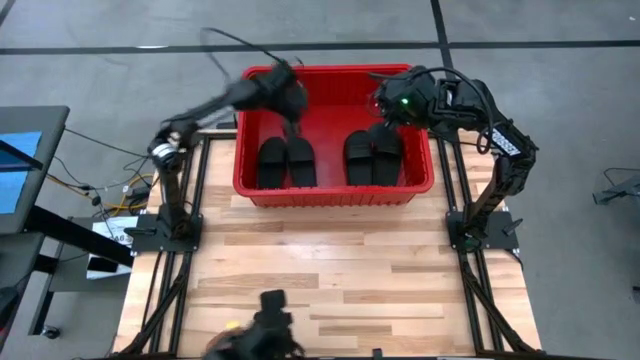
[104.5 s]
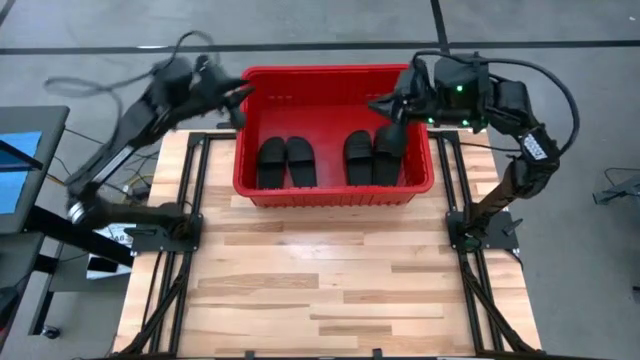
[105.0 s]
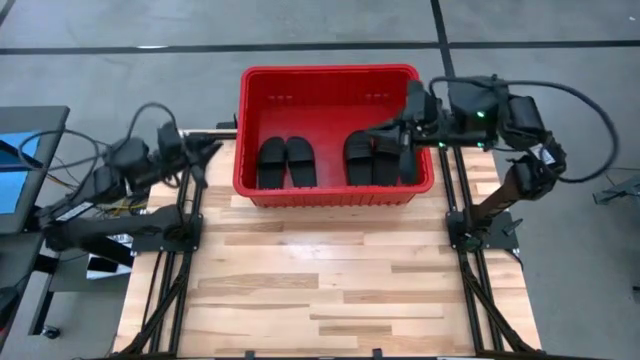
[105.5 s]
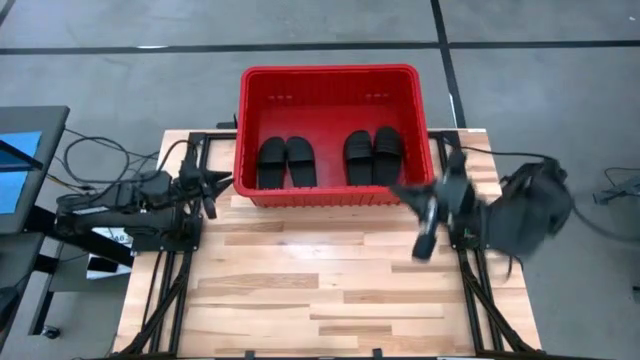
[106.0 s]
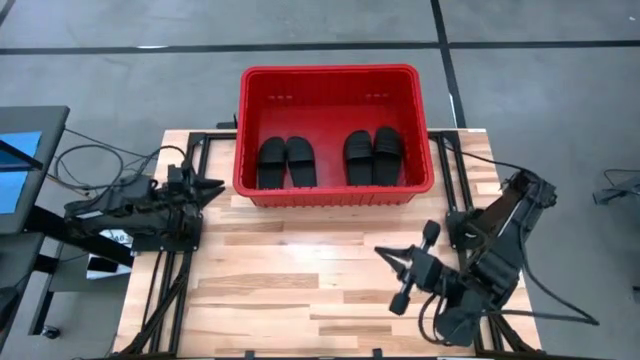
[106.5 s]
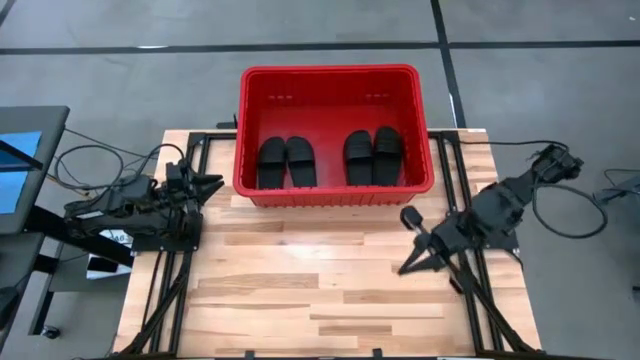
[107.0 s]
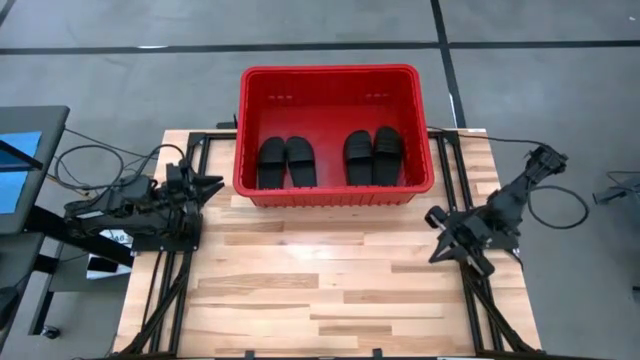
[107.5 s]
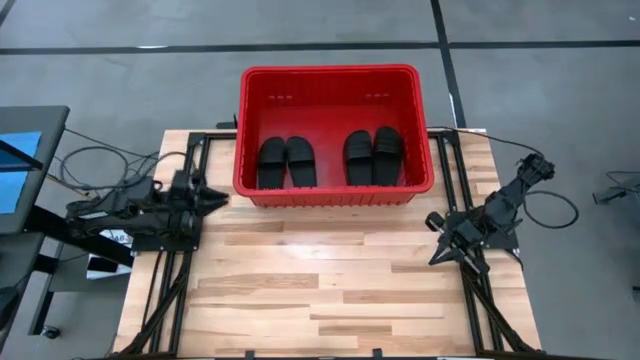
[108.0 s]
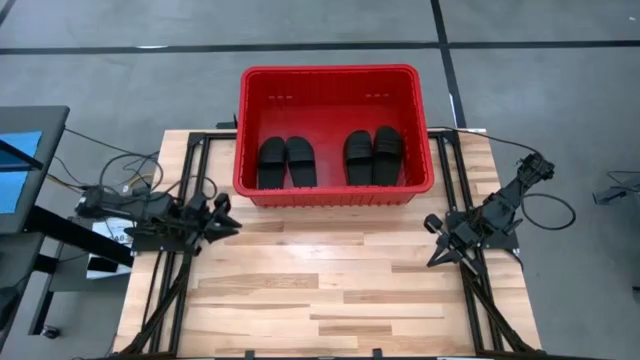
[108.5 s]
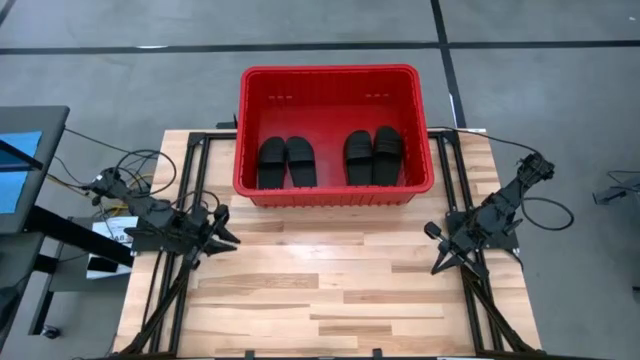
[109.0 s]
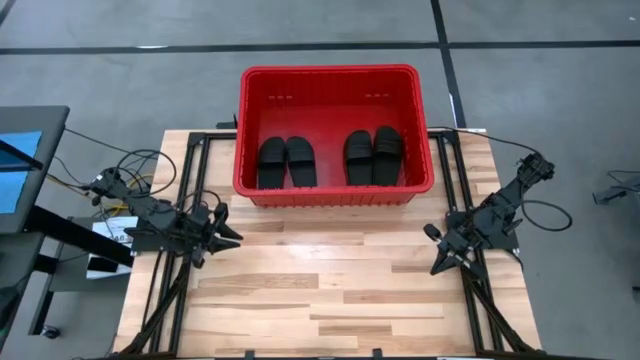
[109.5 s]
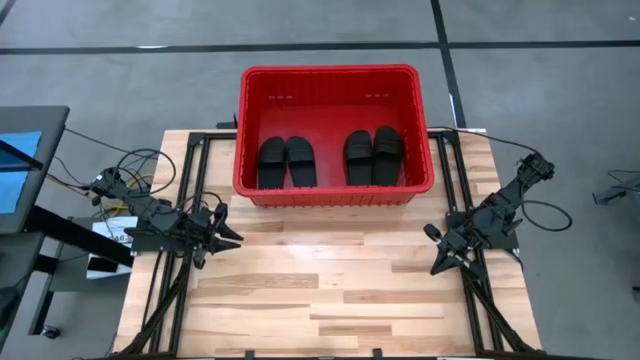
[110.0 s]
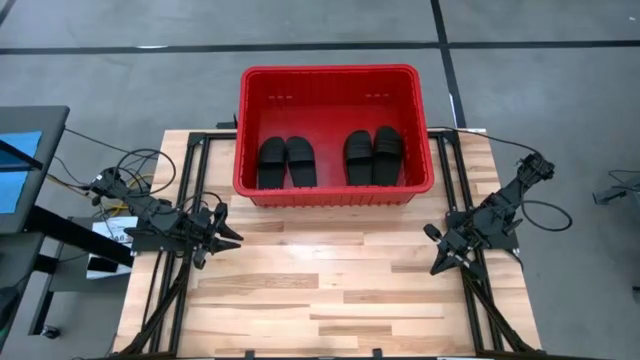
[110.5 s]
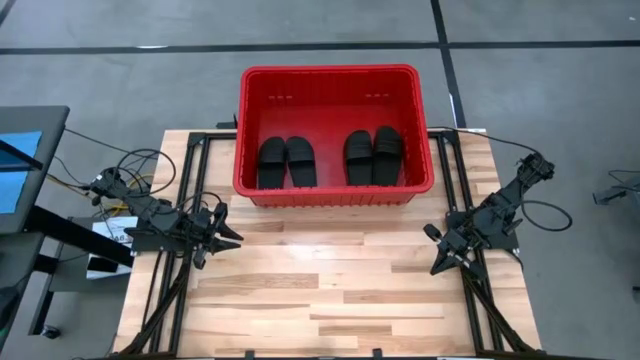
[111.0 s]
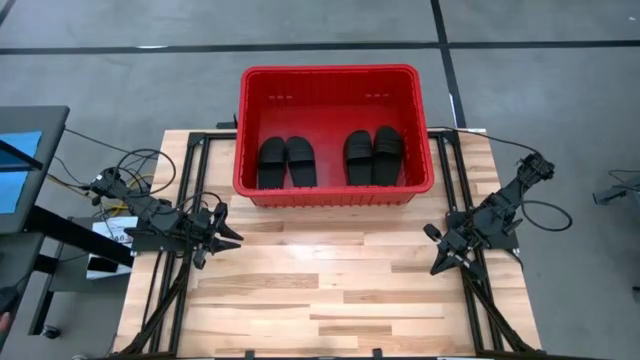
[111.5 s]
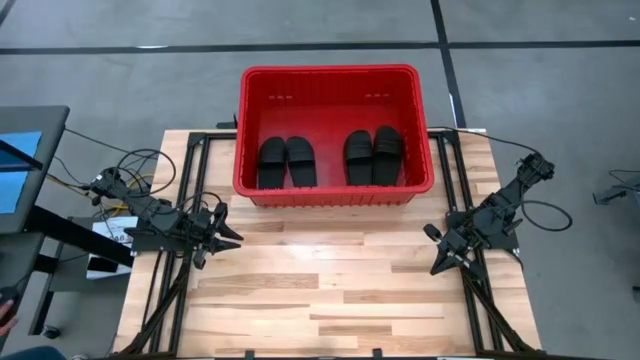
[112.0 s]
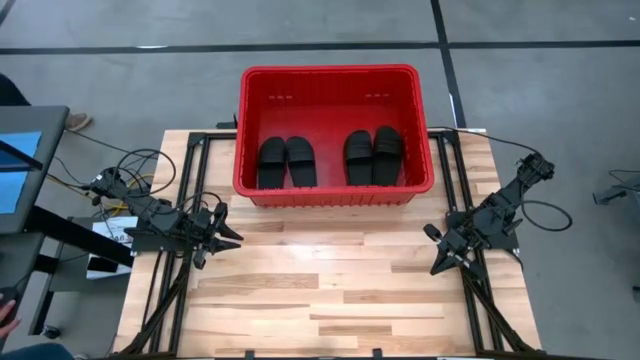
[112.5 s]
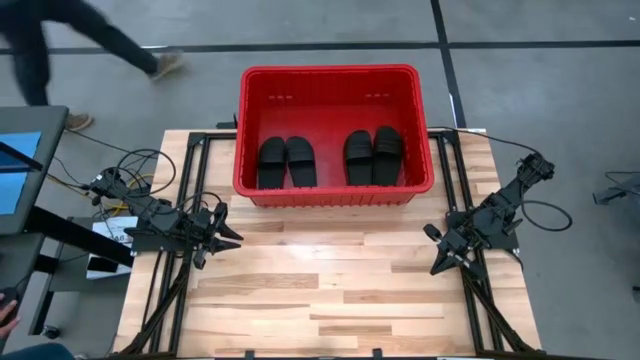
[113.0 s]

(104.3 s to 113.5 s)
Task: Pick and place slides into bin
Return to Home Position

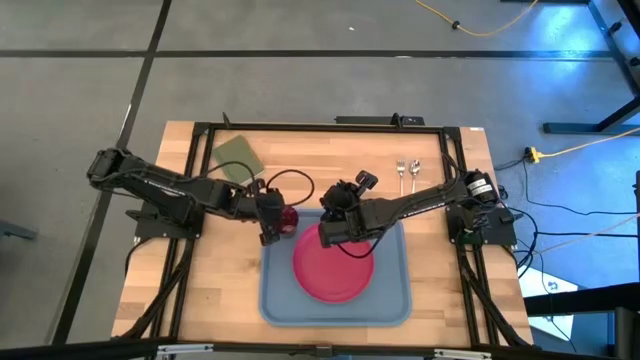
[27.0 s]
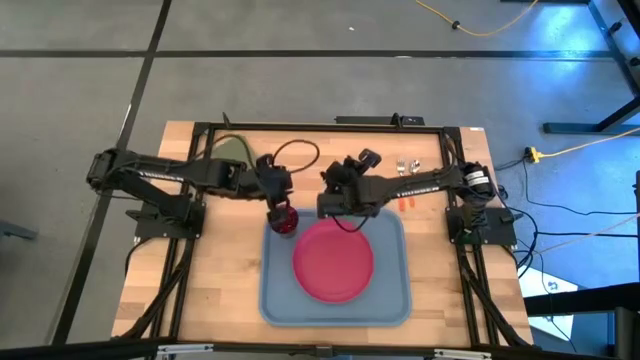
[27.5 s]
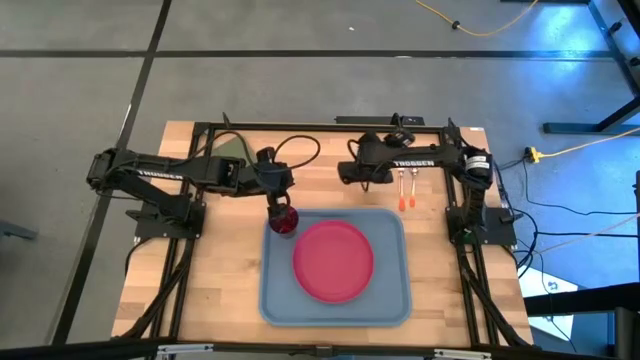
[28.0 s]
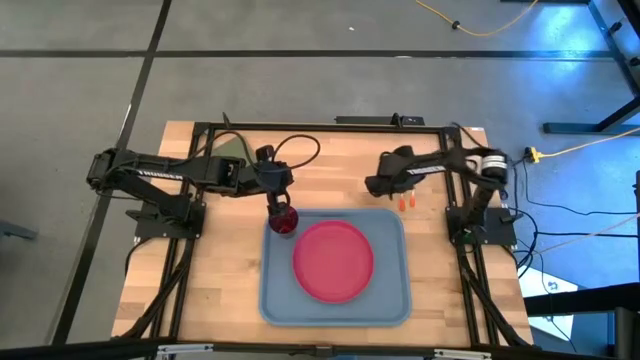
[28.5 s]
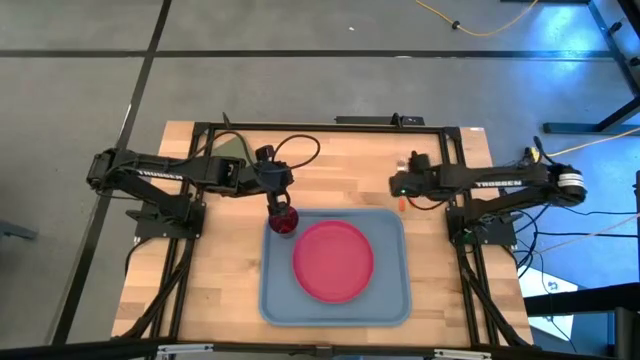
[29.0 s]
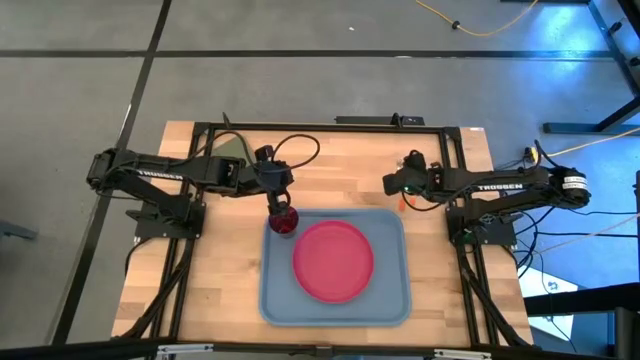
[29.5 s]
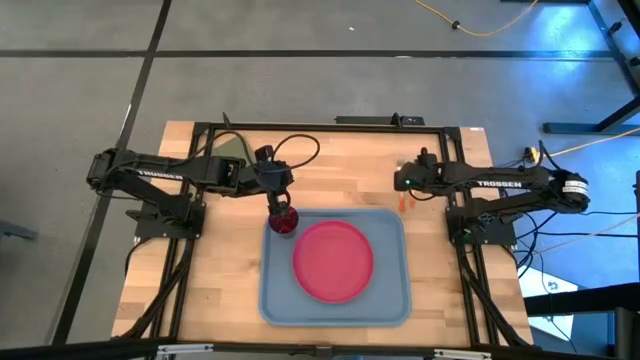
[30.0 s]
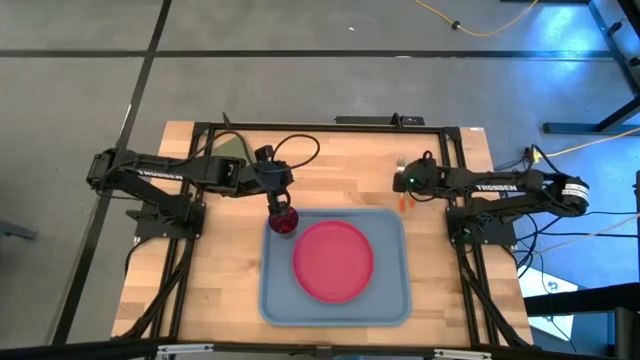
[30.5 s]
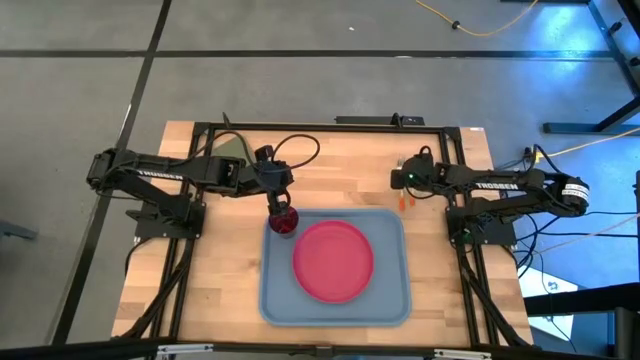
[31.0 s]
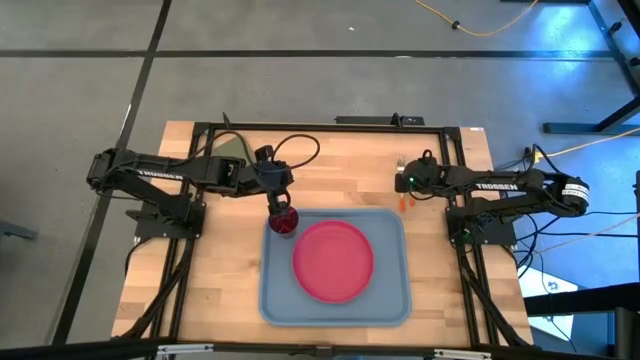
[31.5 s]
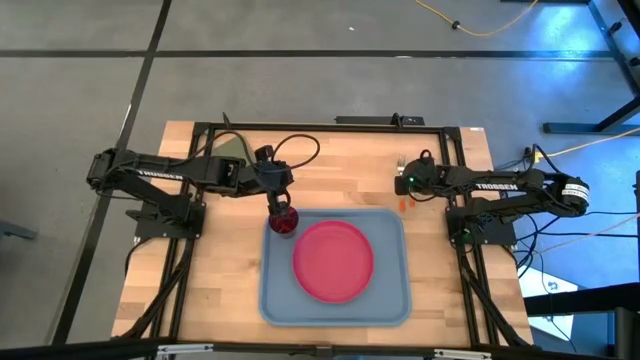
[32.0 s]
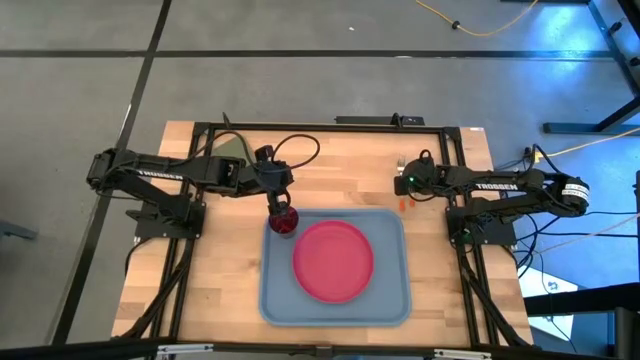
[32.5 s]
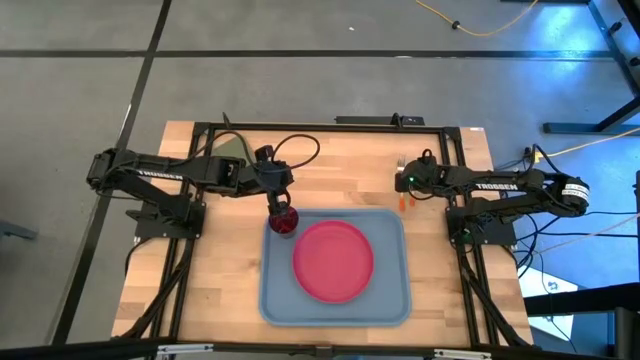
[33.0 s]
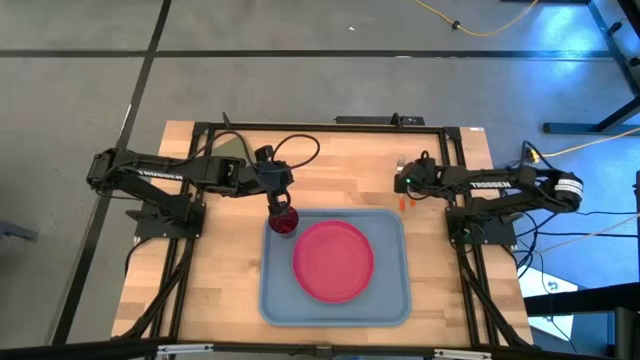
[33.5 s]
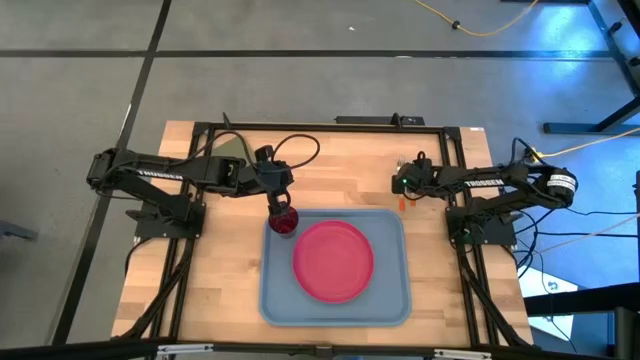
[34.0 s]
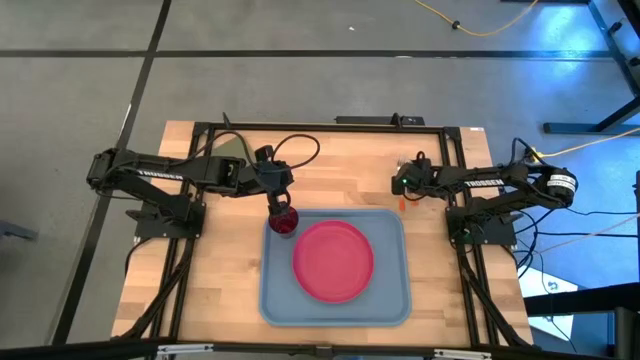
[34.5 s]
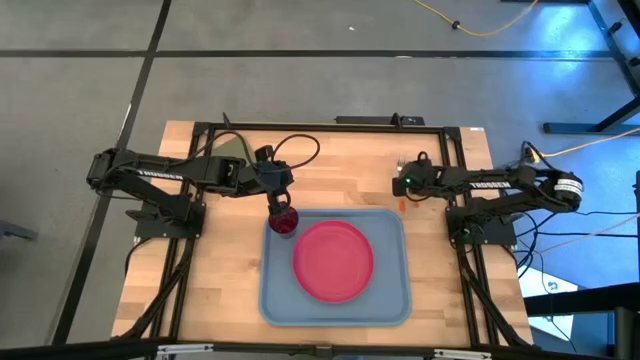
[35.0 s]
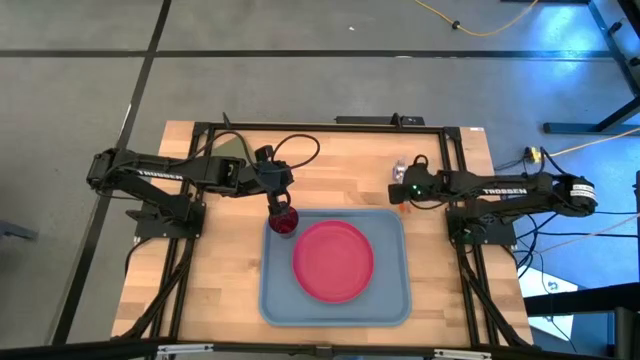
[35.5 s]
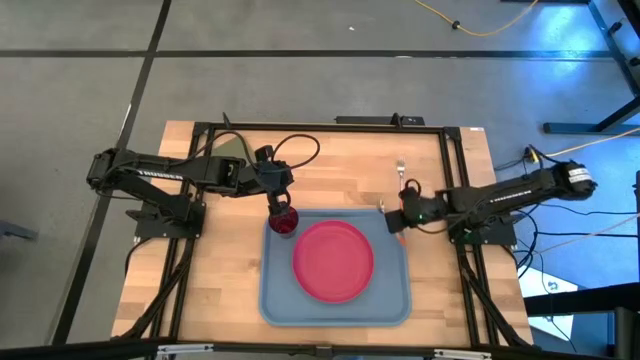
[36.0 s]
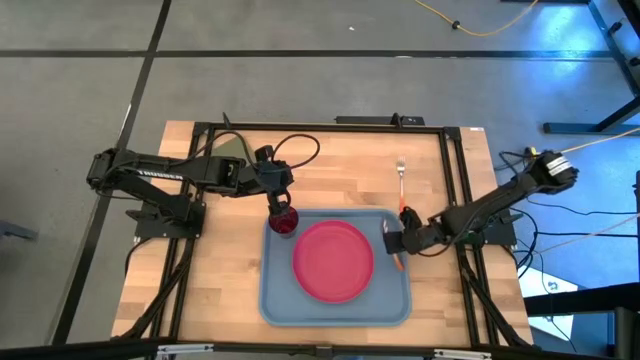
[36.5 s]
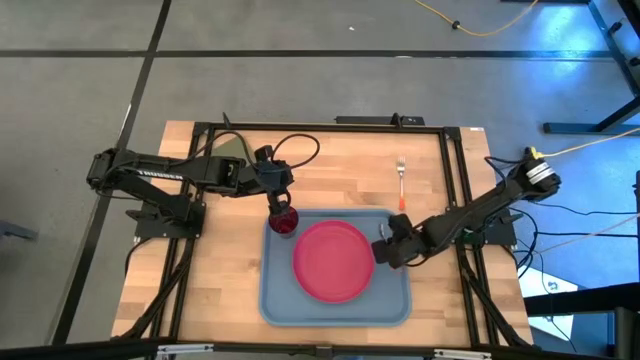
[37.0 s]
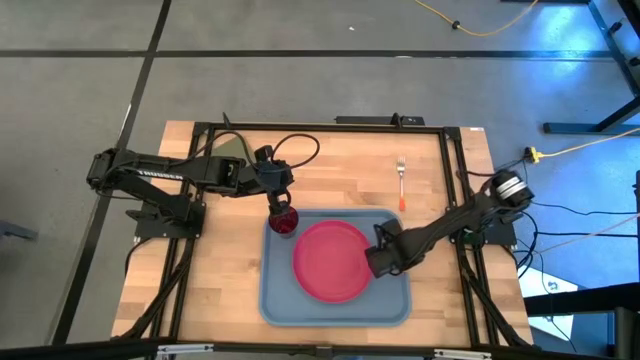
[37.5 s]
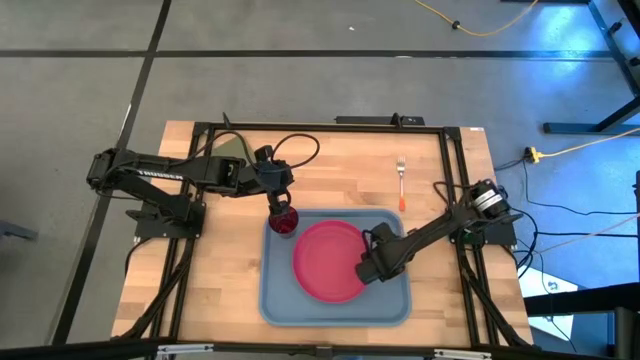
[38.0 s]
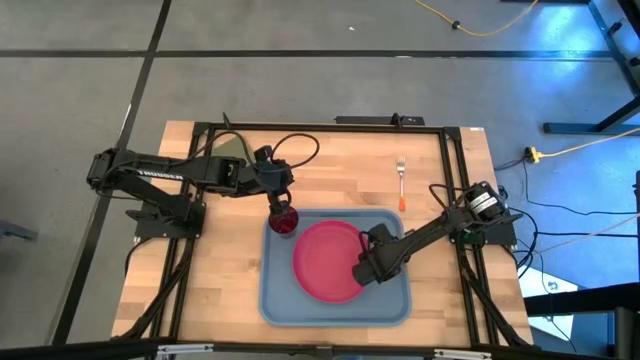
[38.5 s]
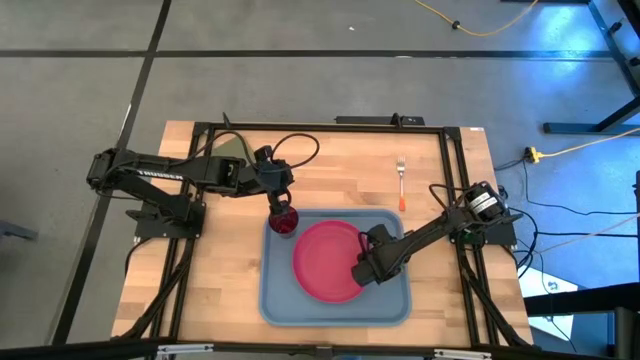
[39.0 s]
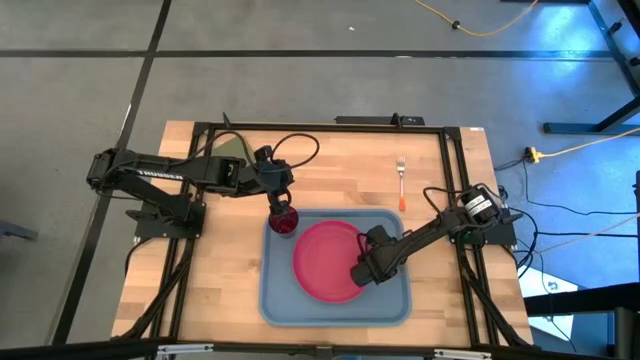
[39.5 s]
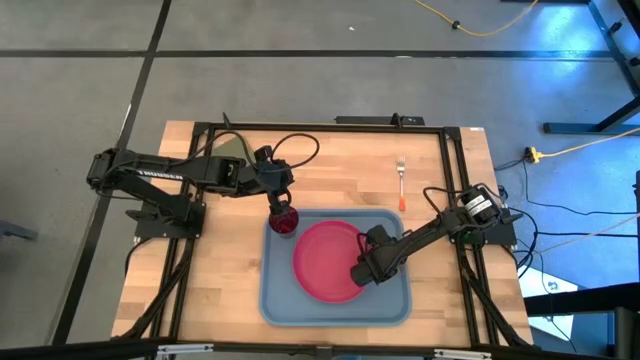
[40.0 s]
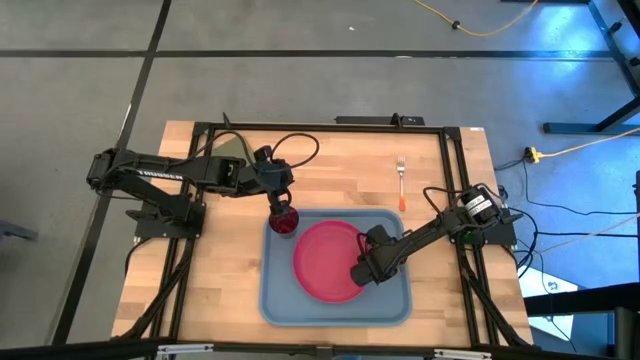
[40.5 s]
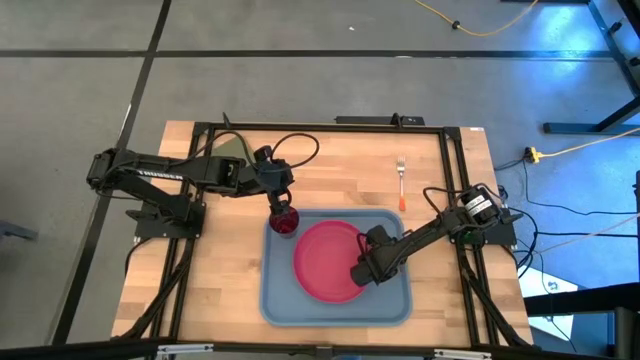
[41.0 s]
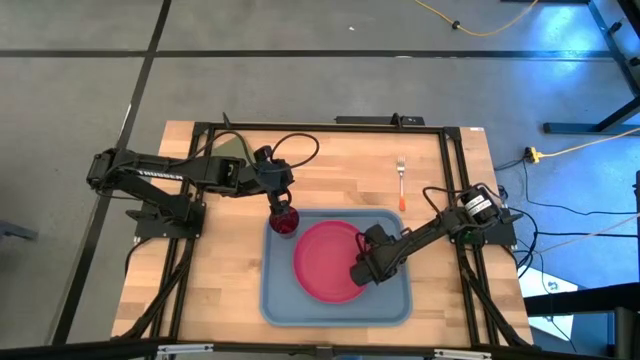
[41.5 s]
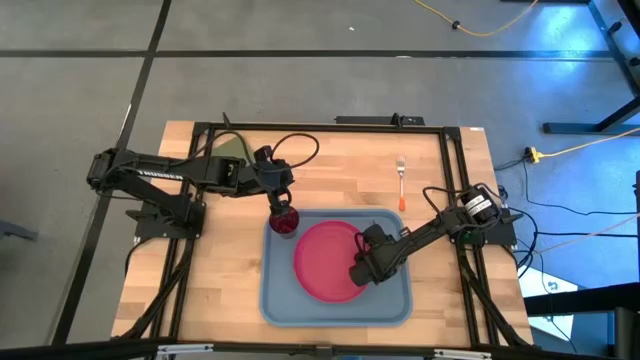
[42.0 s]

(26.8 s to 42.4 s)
Task: Pick and place plate/cup/fork/spoon on tray
Put the orange spoon on the blue serving tray to the right of the pink plate
